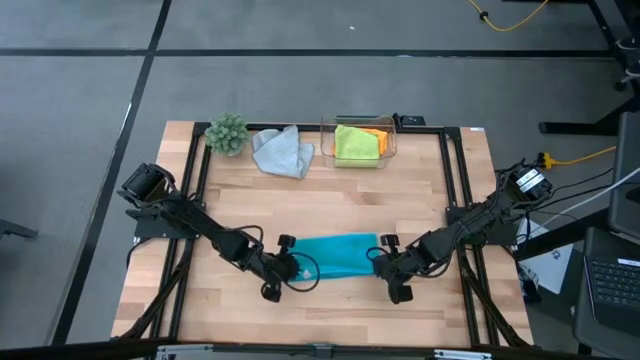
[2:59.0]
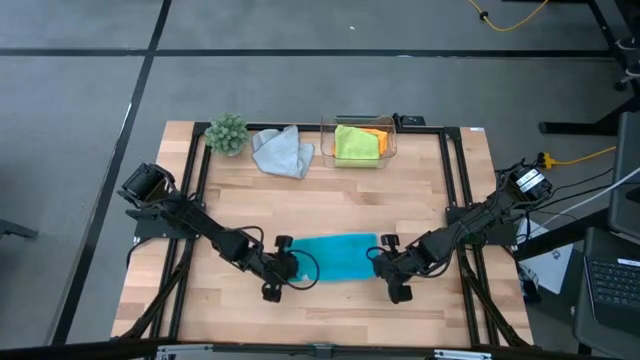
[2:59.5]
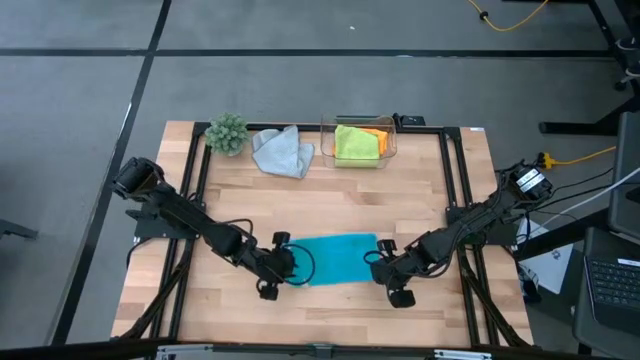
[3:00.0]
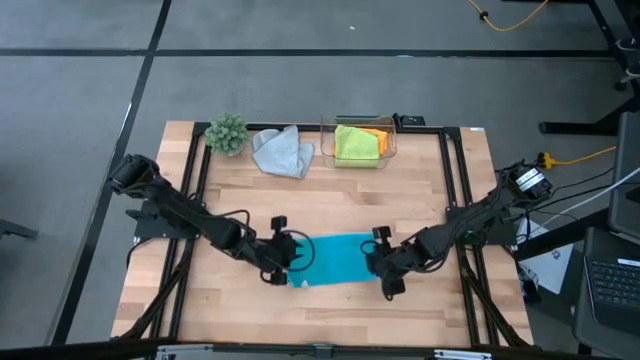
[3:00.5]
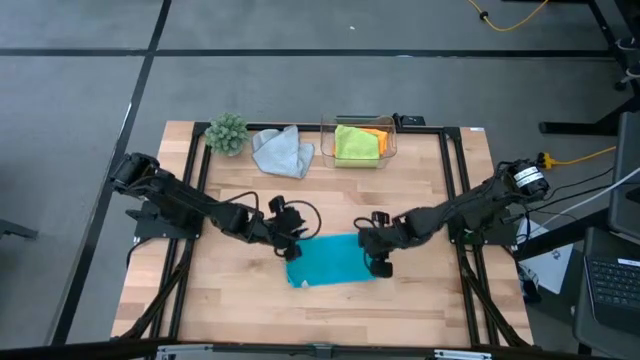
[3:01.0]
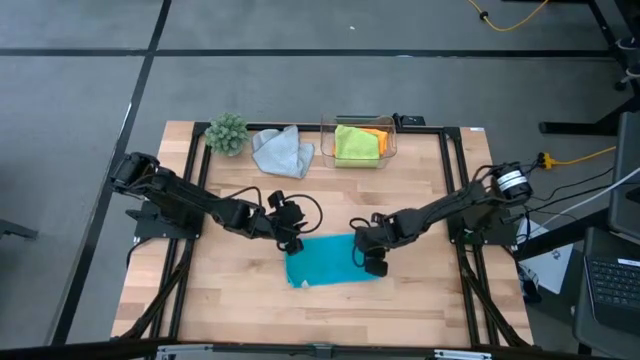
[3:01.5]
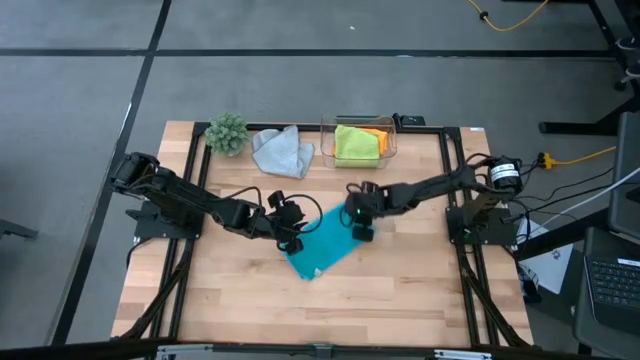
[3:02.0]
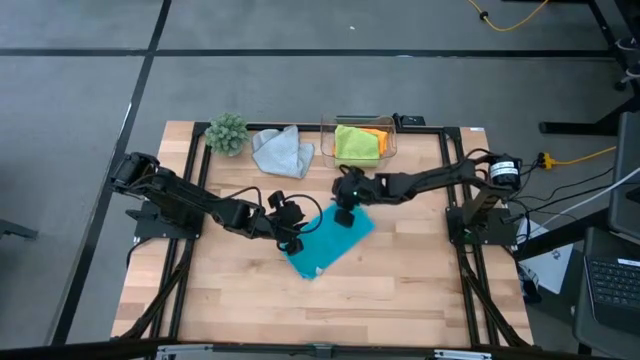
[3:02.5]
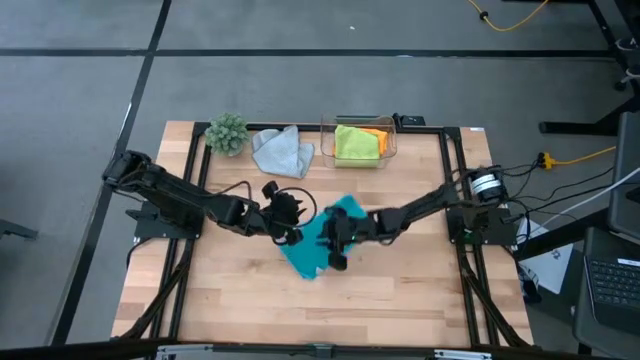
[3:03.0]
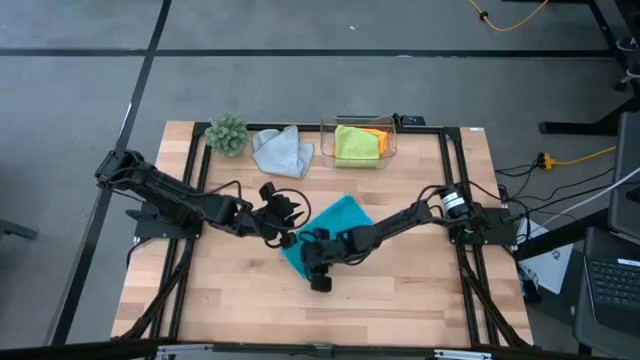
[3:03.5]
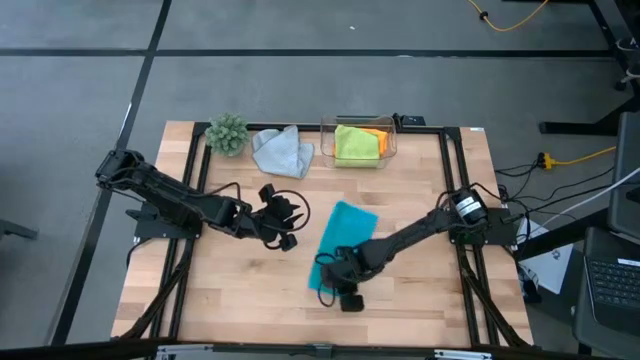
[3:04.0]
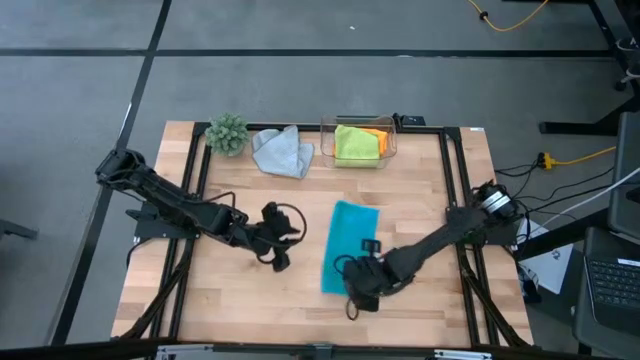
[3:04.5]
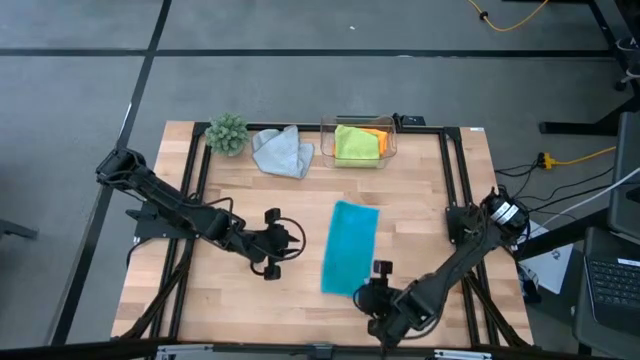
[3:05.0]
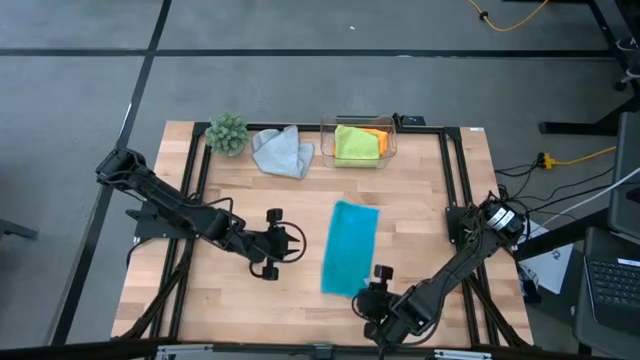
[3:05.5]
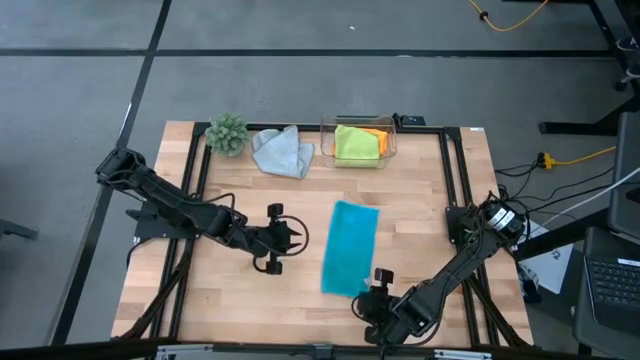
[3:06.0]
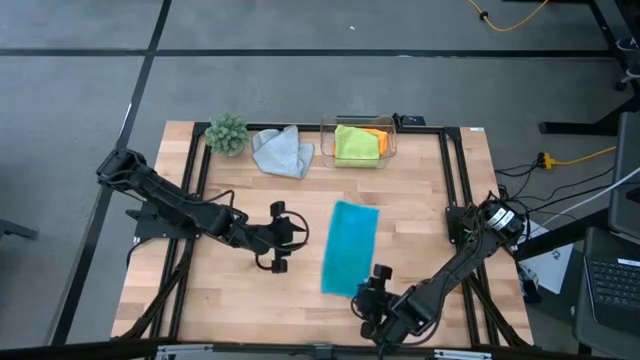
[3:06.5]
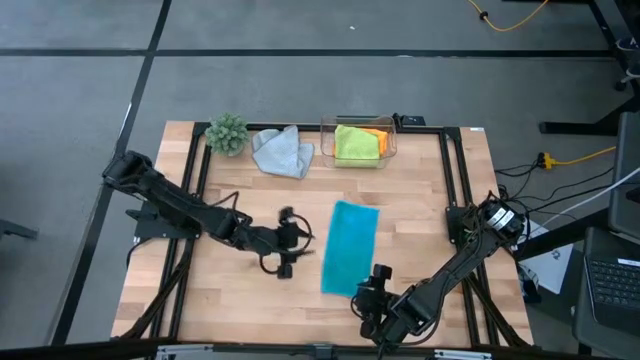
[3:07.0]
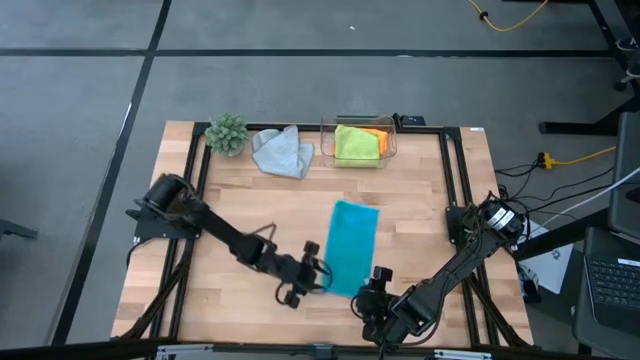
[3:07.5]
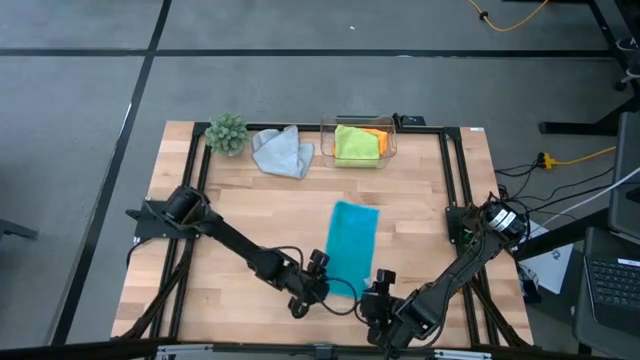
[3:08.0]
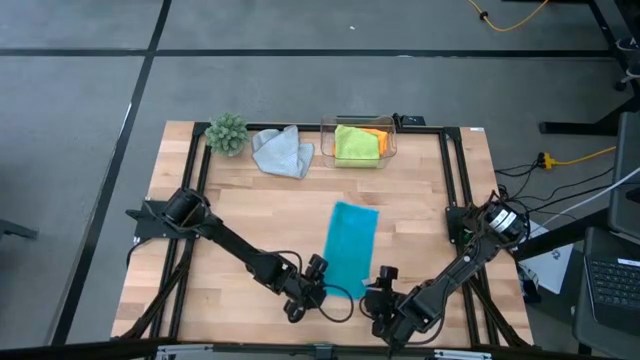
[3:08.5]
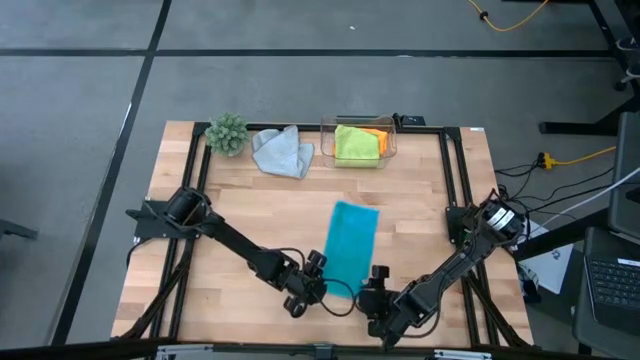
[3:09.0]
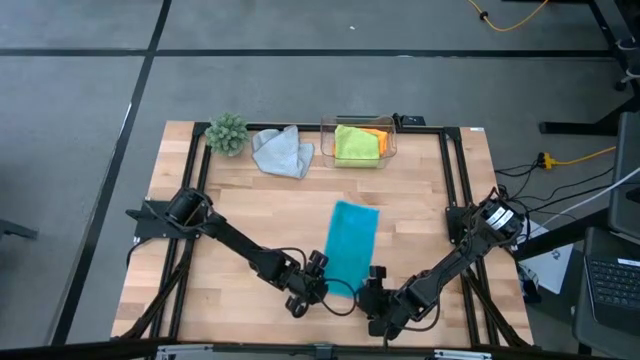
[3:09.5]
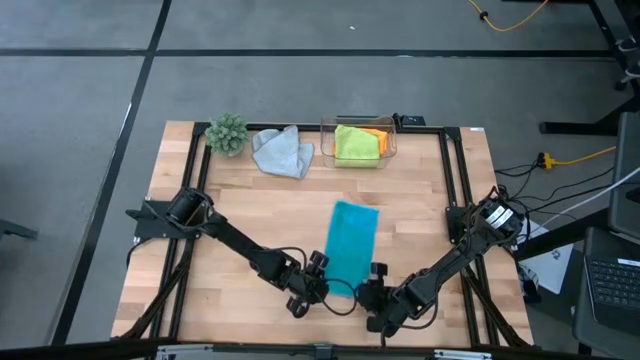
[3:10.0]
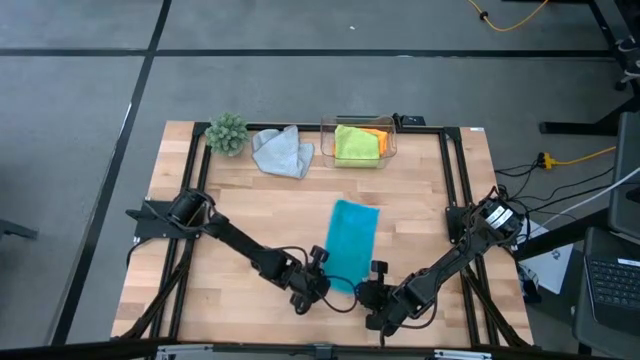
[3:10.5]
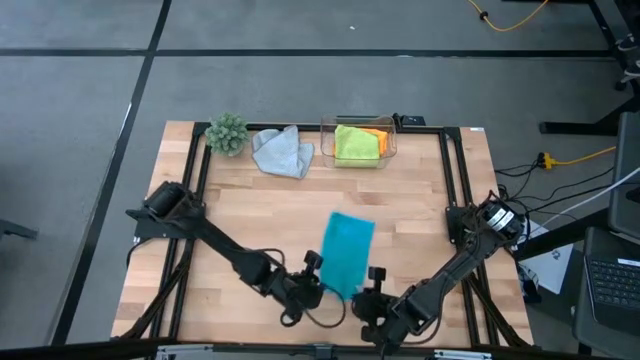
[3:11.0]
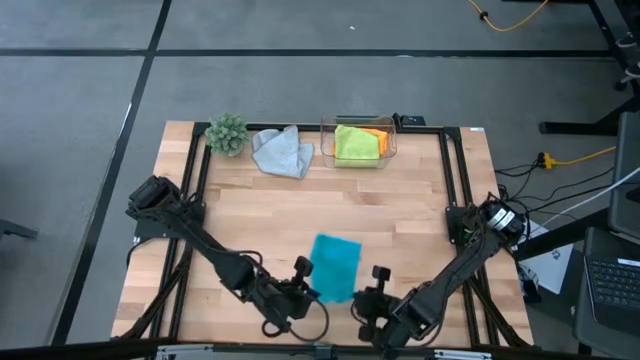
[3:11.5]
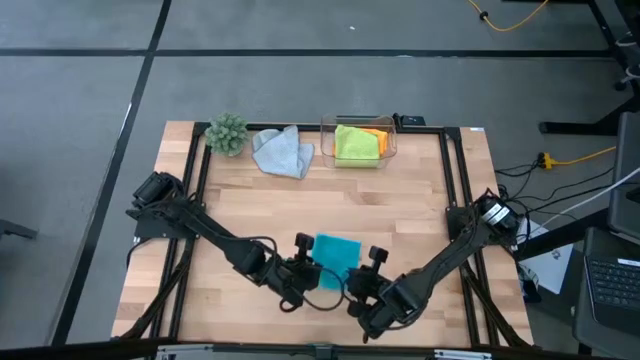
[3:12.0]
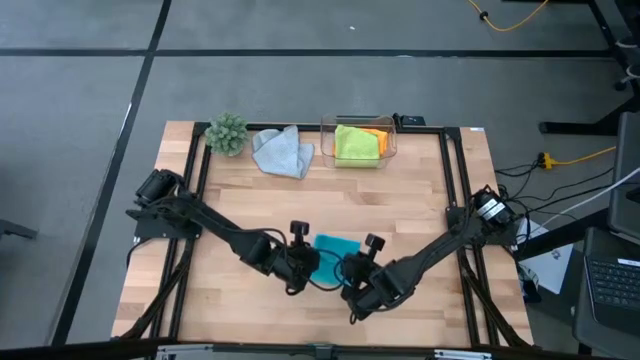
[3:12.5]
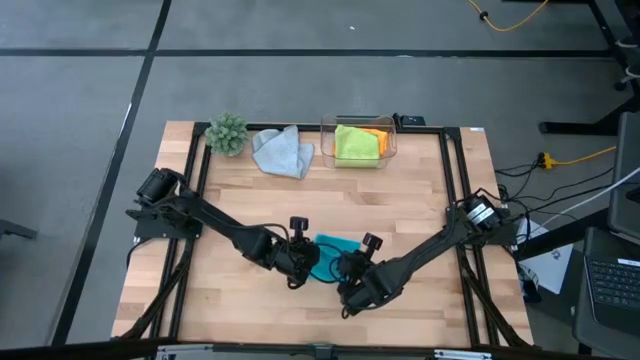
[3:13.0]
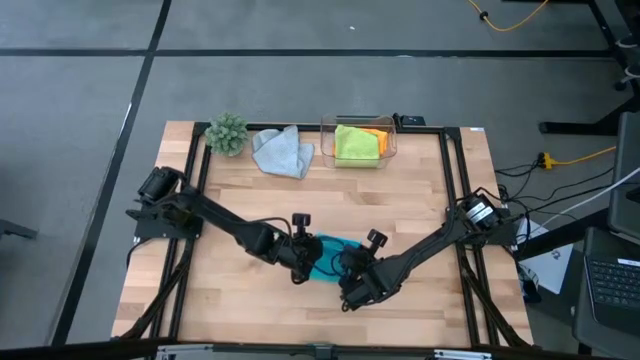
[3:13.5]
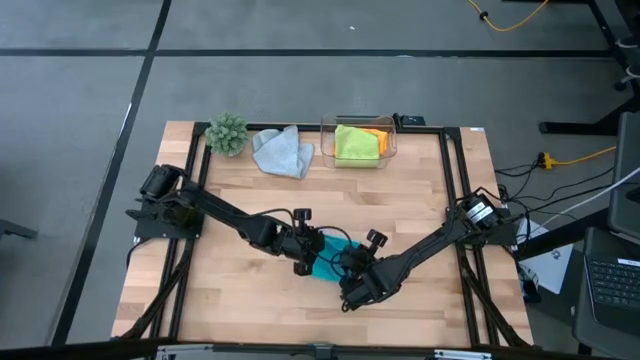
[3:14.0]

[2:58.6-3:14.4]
Task: Fold microfiber towels
Fold the blue microfiber cloth

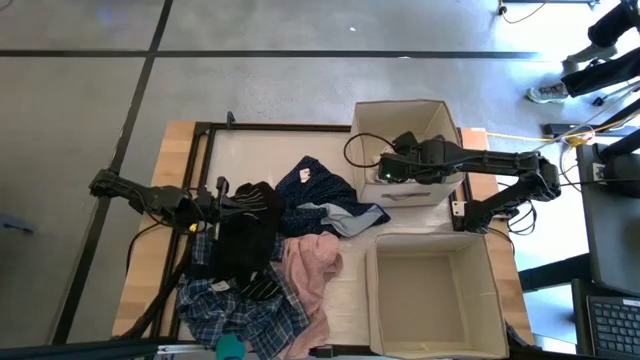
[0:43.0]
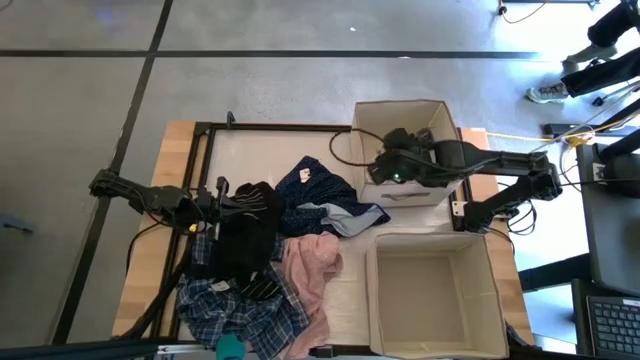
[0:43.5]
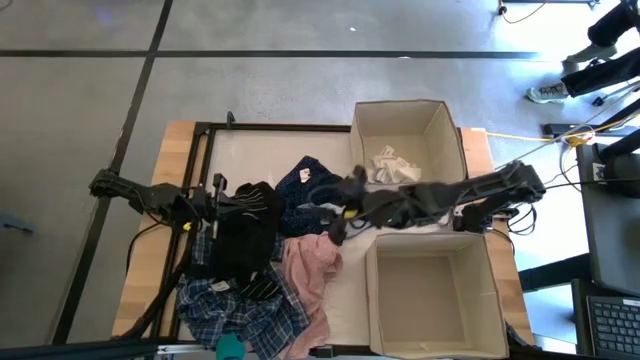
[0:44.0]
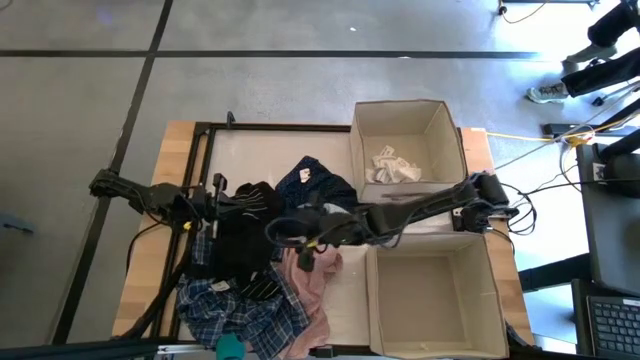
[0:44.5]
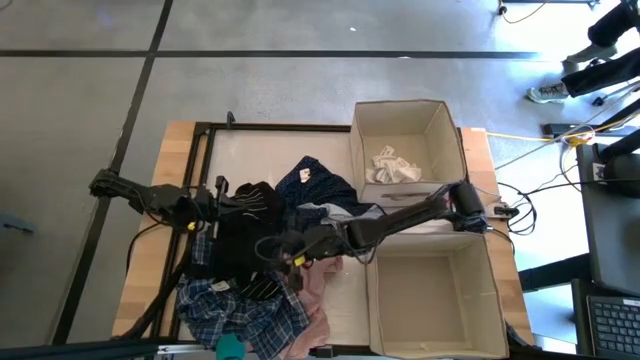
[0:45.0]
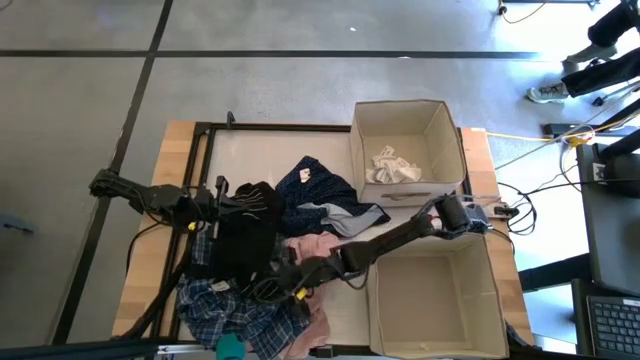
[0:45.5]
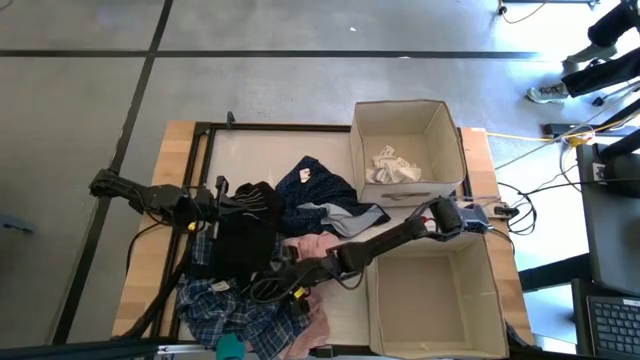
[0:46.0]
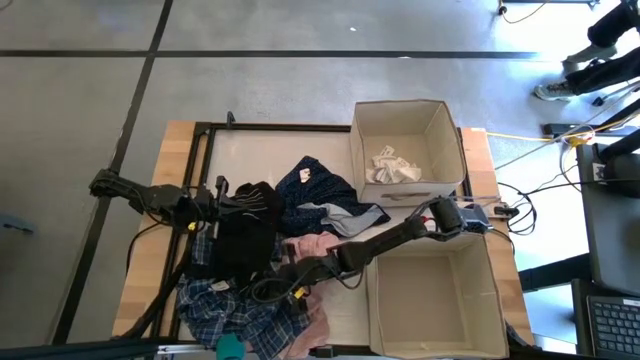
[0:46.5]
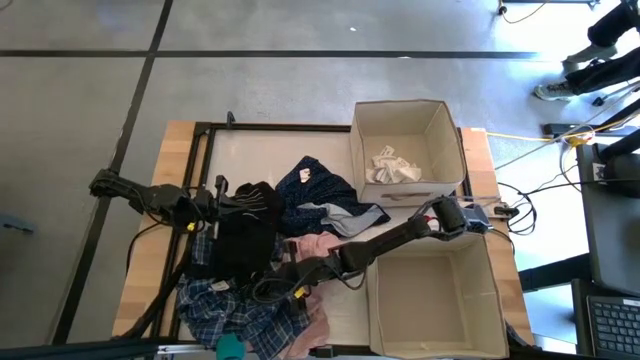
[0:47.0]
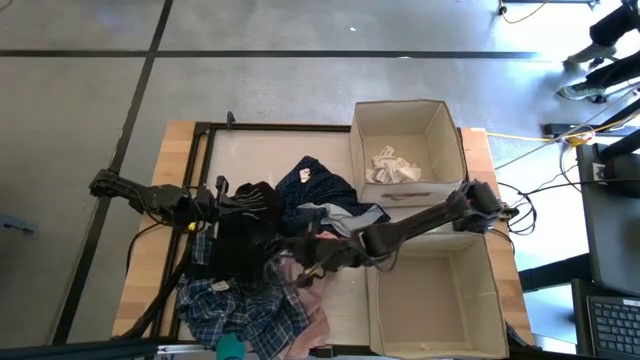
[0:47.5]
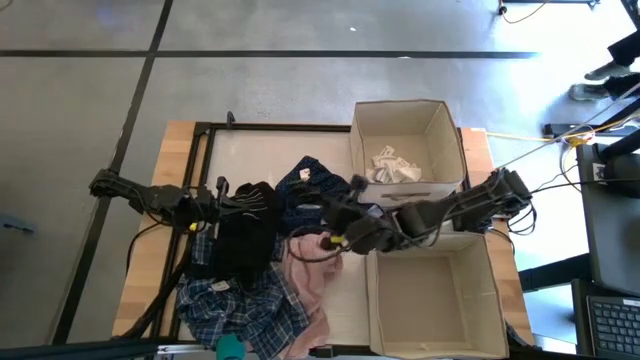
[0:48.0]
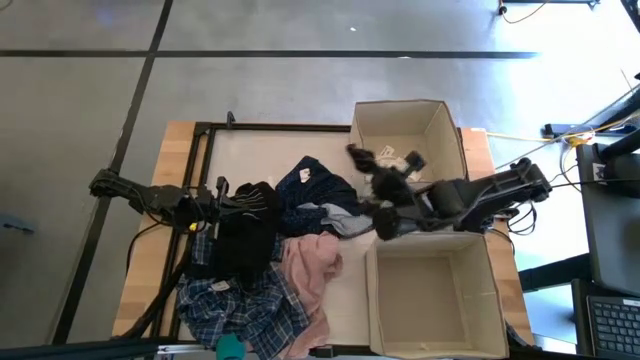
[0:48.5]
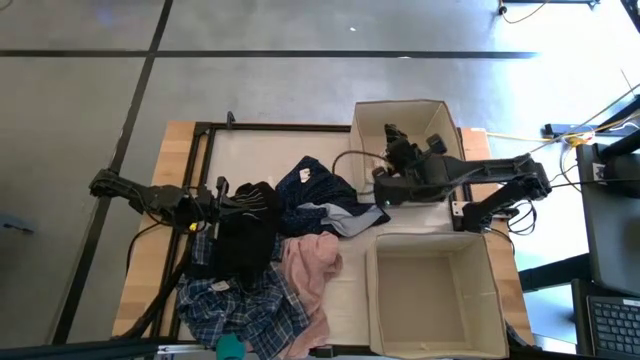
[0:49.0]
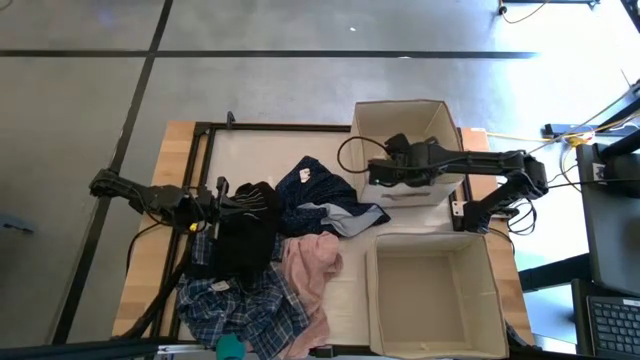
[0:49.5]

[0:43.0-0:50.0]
Task: Sort clothes
Put the black striped sock into the top laundry organizer
